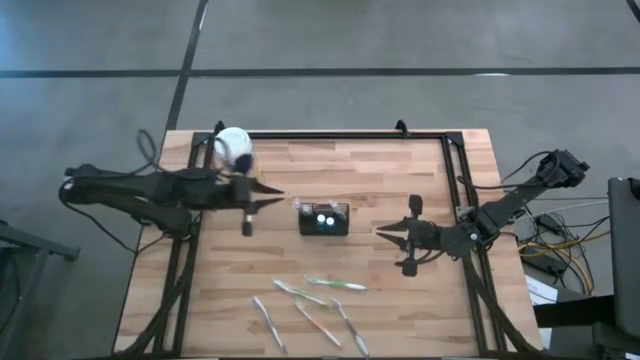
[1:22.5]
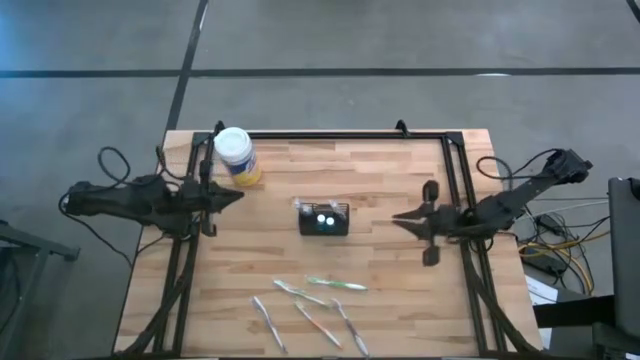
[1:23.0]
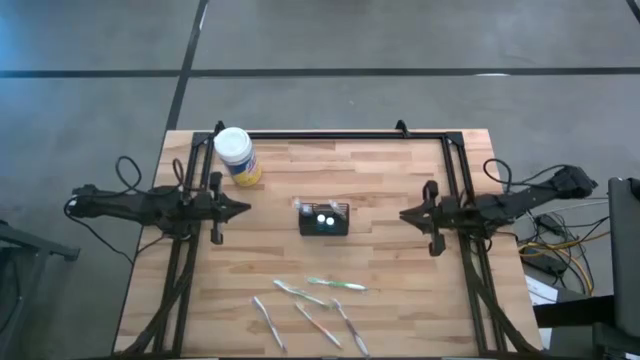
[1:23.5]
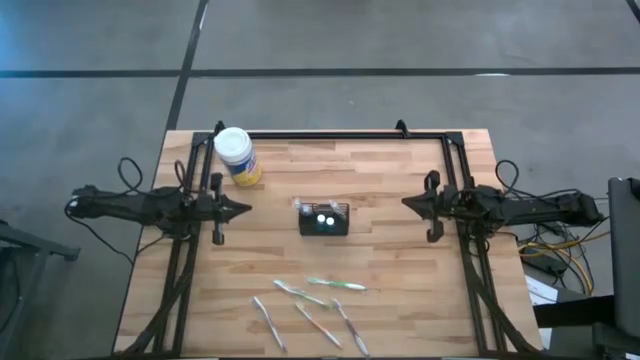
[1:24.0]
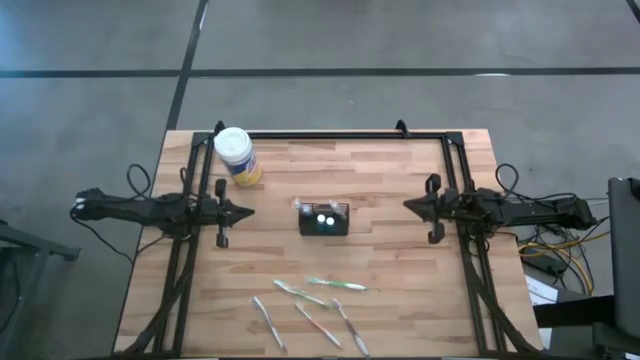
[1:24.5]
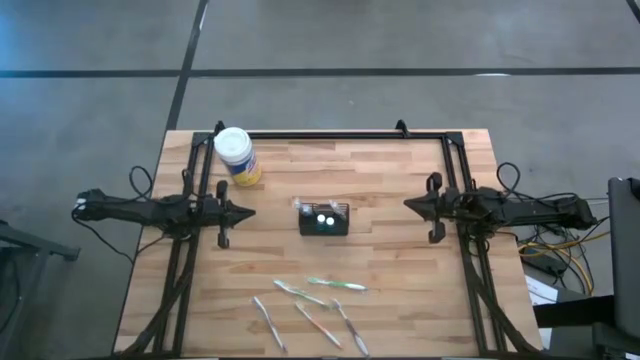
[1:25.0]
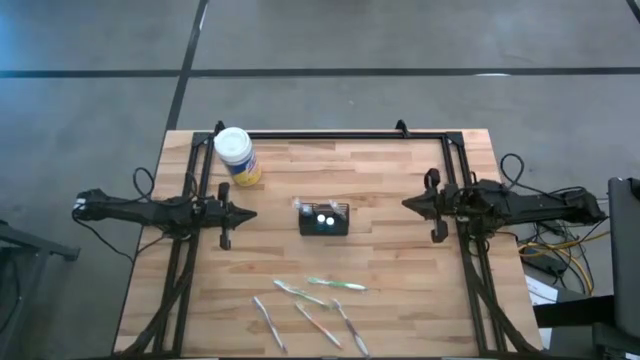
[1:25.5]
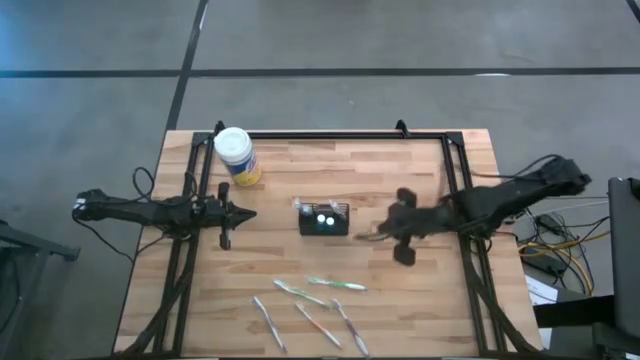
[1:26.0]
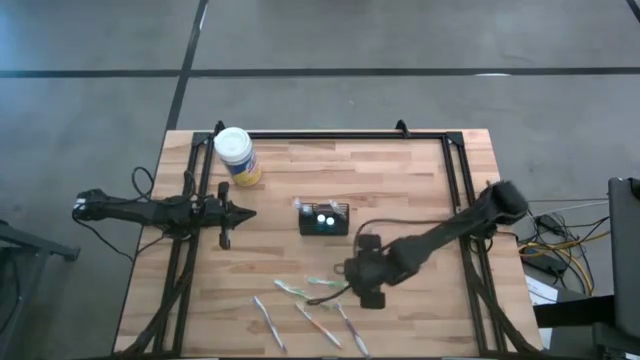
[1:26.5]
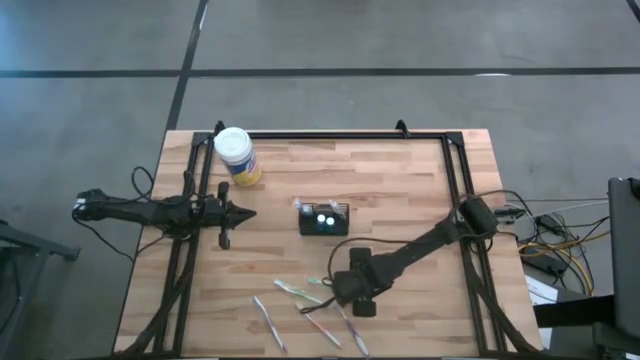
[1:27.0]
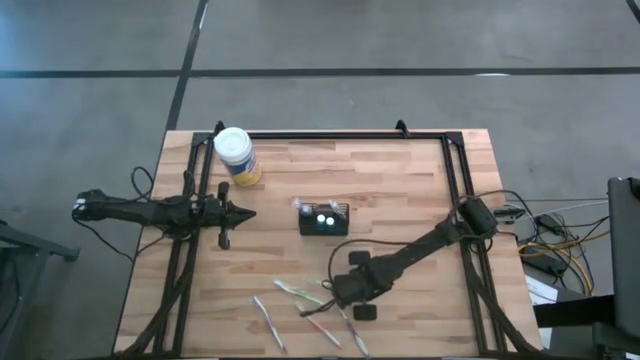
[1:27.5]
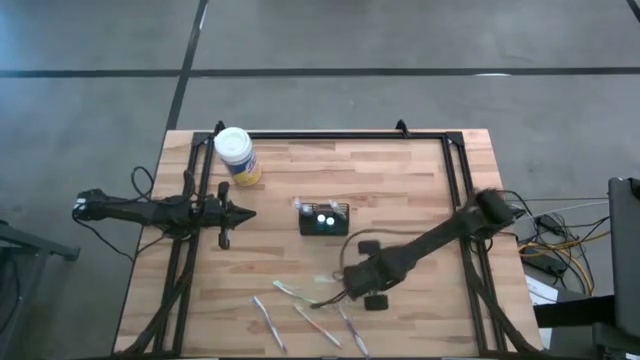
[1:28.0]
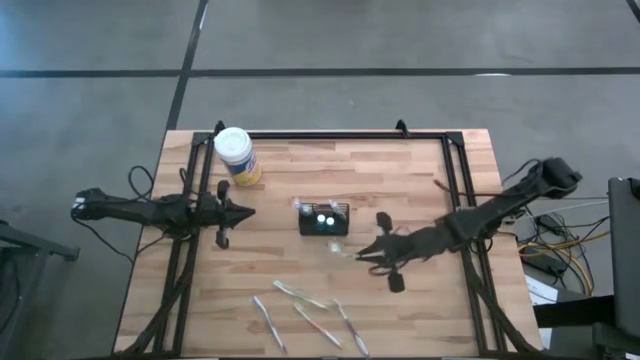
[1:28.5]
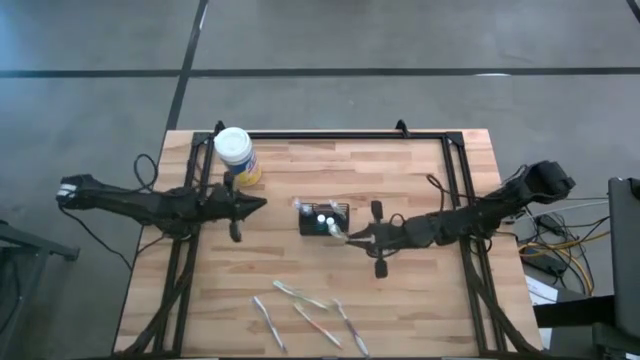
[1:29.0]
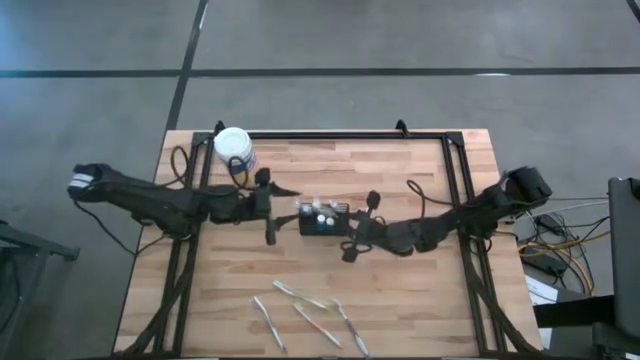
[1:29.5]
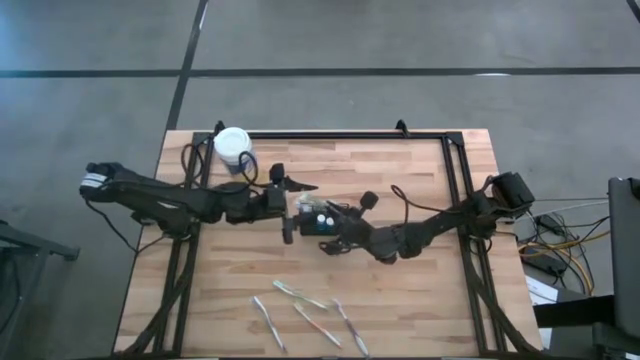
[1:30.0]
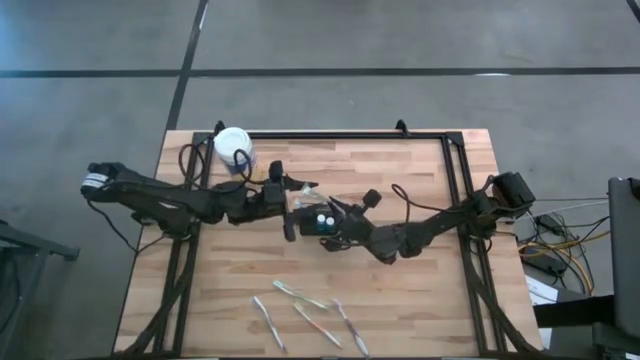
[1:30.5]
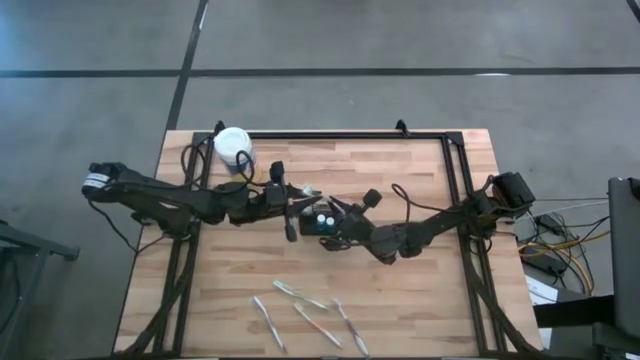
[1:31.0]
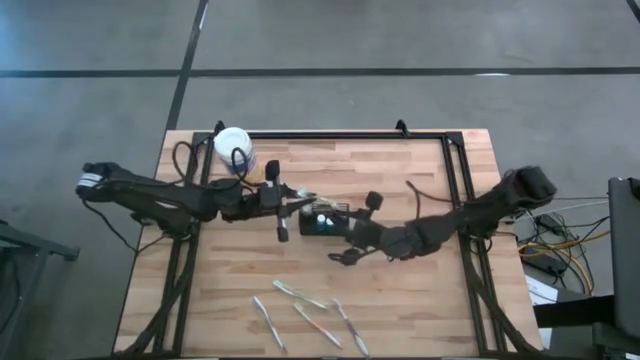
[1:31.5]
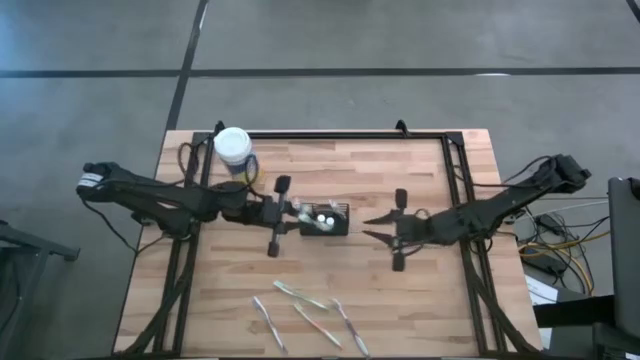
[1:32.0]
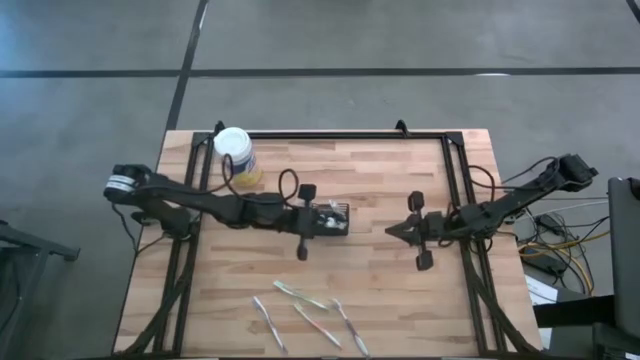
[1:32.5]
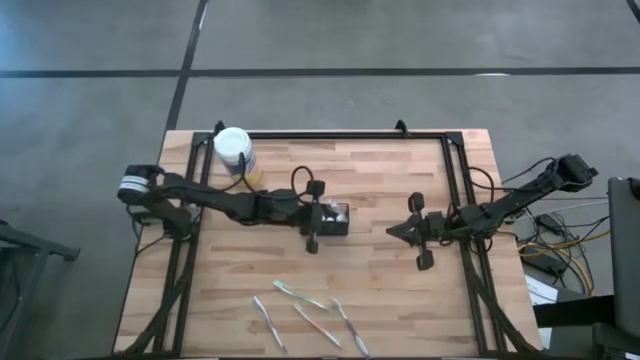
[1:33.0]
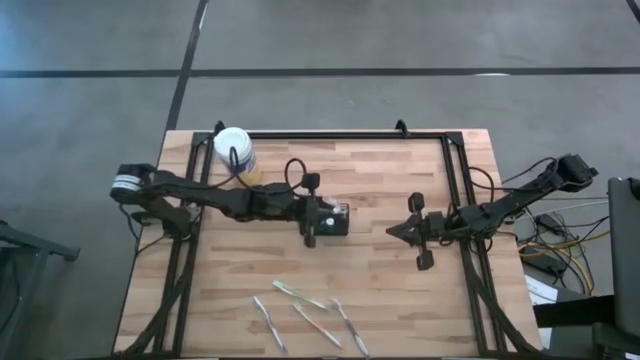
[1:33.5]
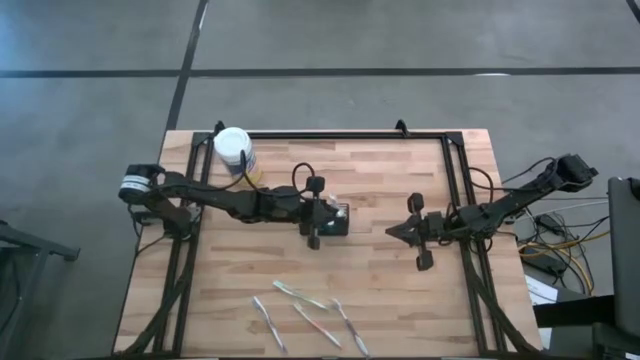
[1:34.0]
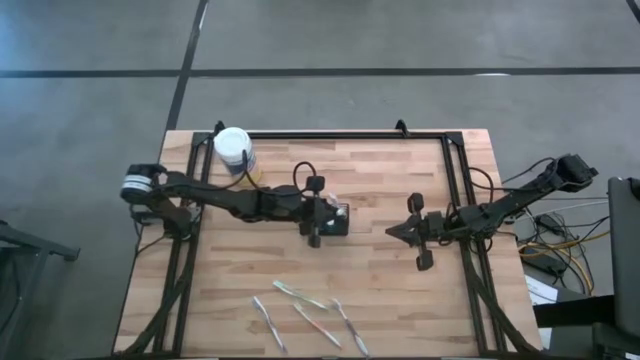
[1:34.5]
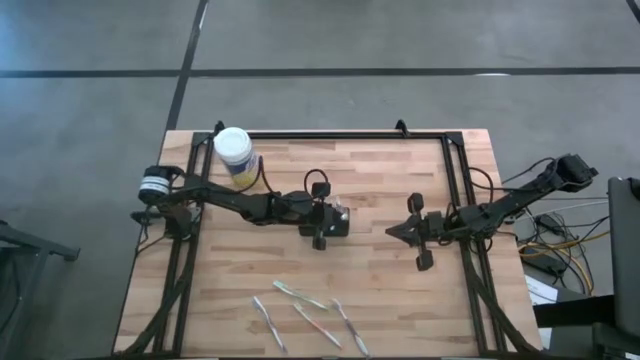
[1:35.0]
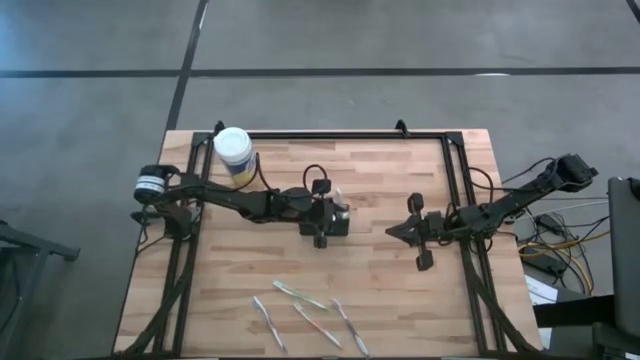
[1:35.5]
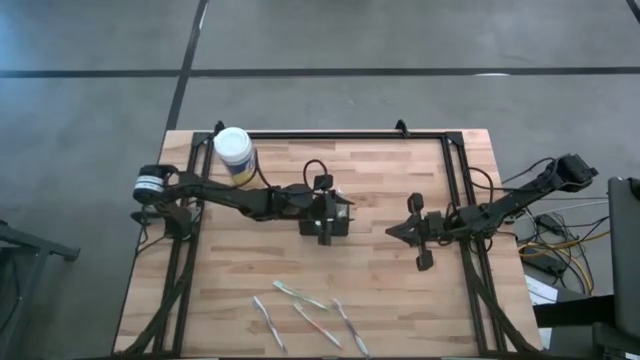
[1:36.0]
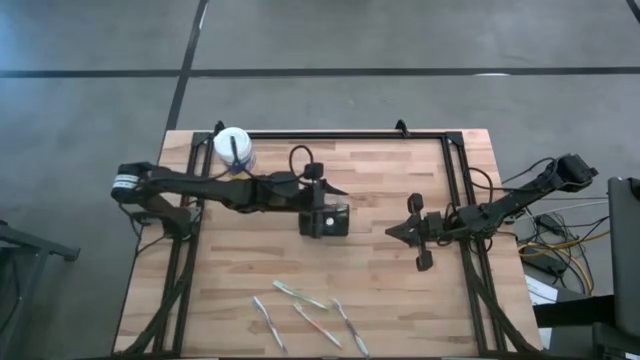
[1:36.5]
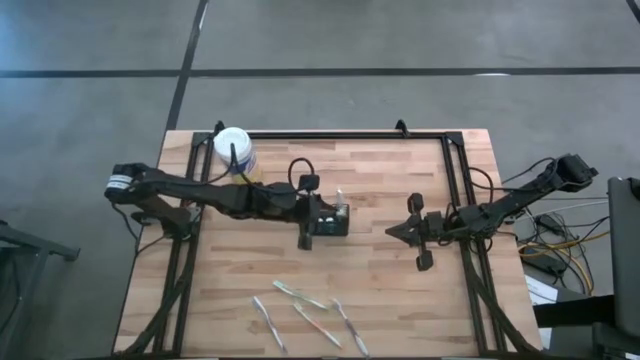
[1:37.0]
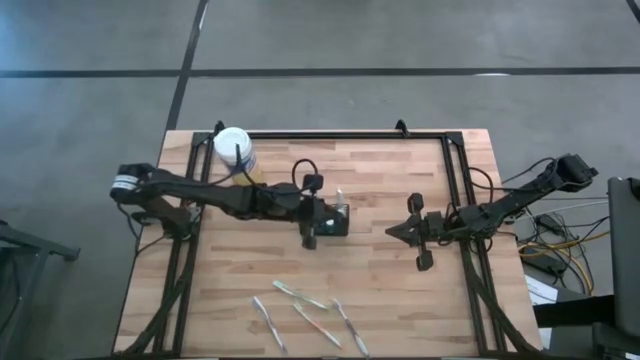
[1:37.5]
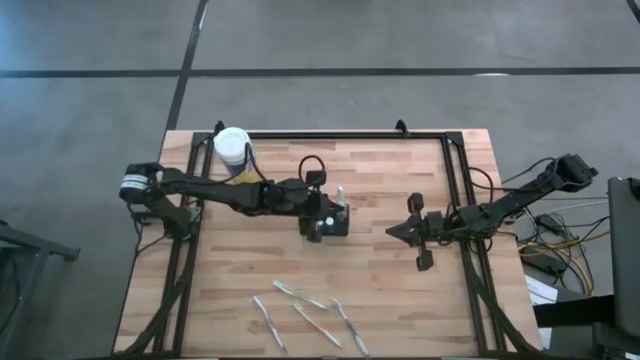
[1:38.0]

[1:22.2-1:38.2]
Task: Pick & Place toothbrushing station
Put the right green toothbrush into the mesh organizer

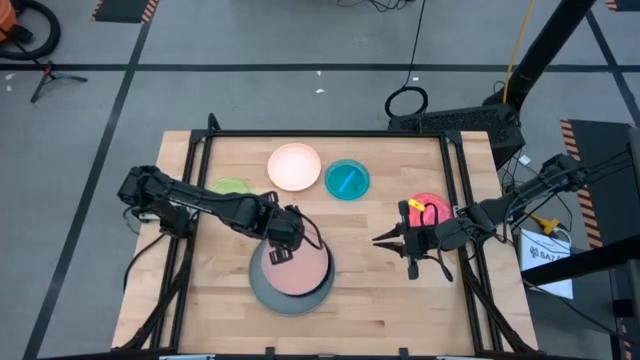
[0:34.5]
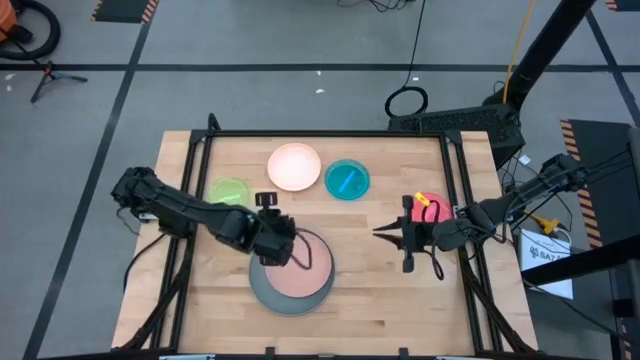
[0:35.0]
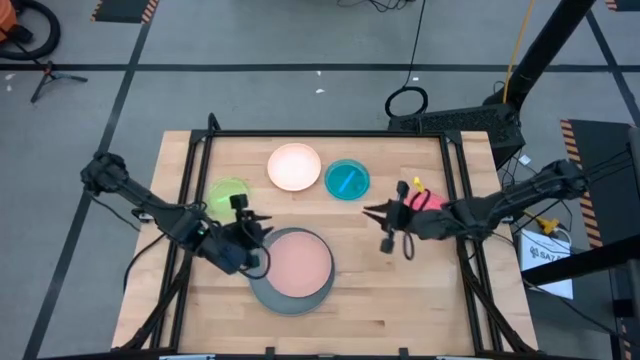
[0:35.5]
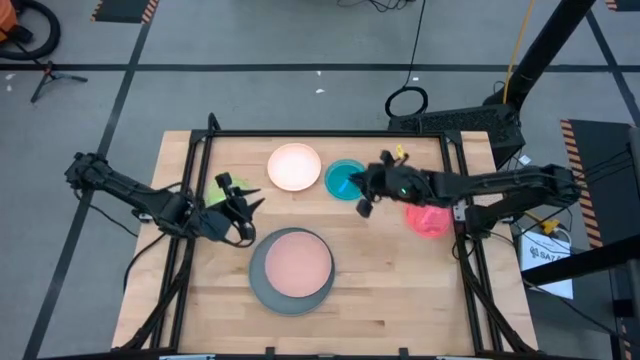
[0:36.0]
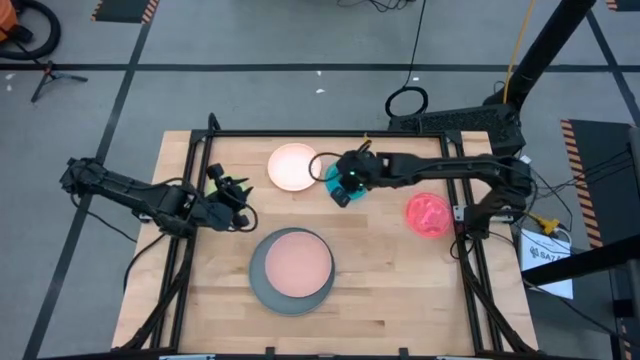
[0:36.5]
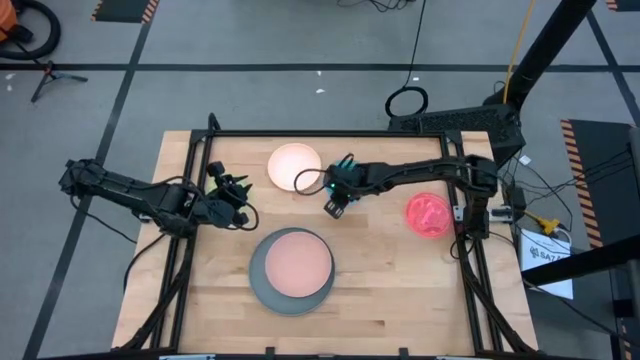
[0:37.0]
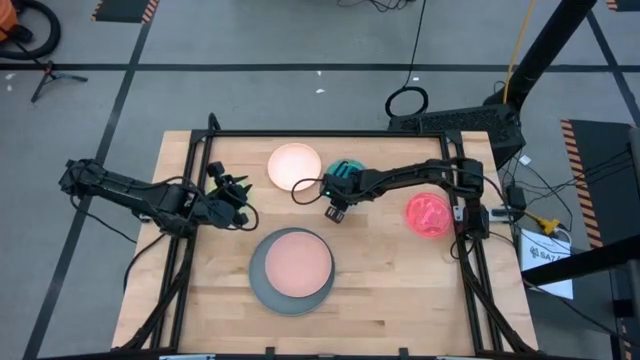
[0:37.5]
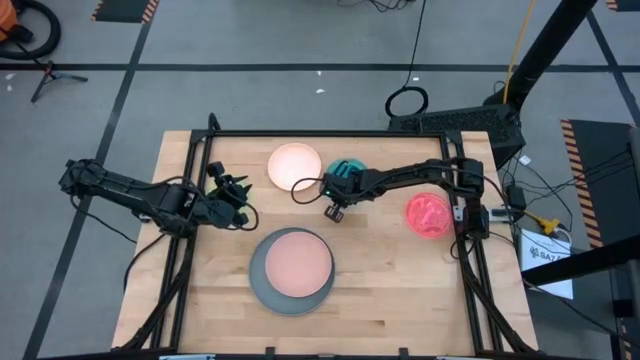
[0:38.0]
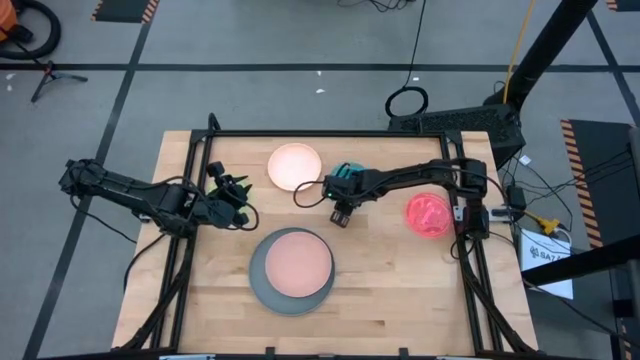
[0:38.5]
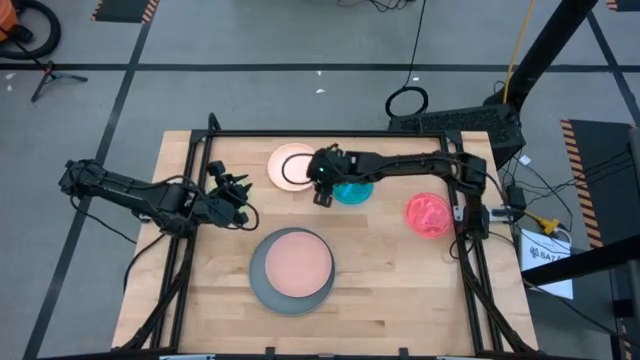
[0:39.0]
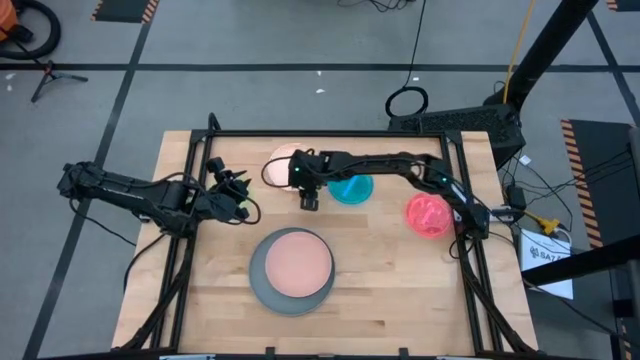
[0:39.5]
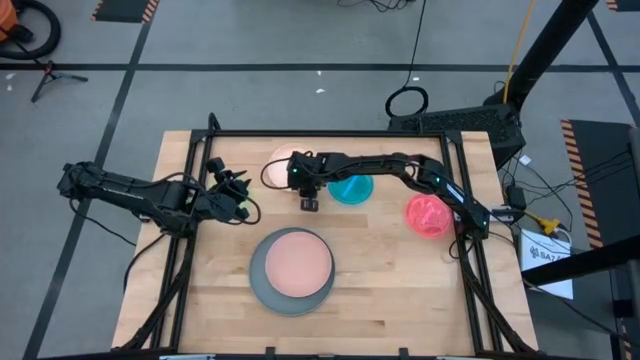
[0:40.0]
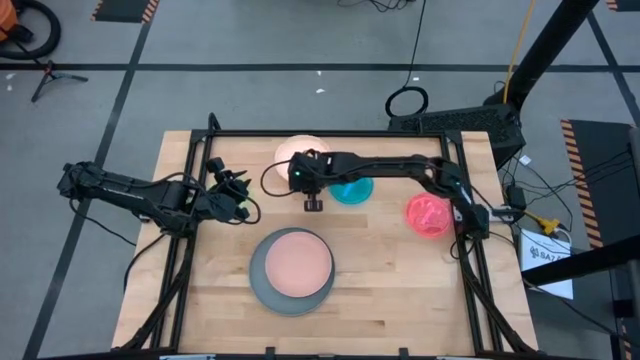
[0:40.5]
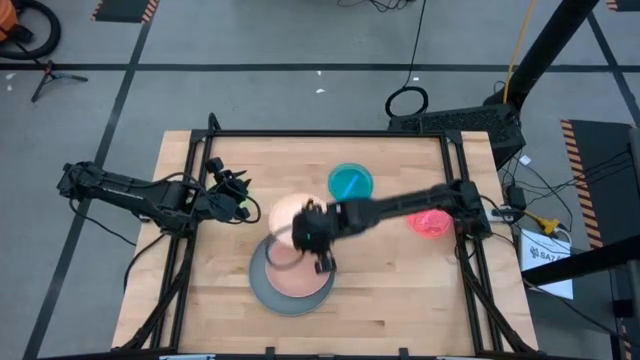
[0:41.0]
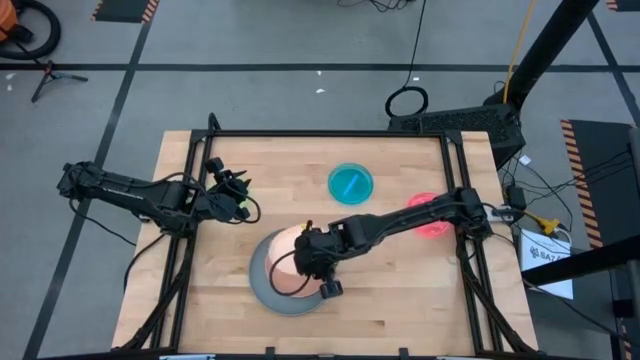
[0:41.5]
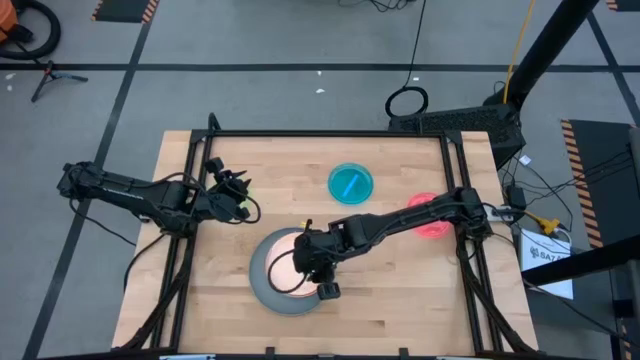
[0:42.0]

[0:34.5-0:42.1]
Task: Stack plastic plates
Stack the light orange plate on top of the pink plate
